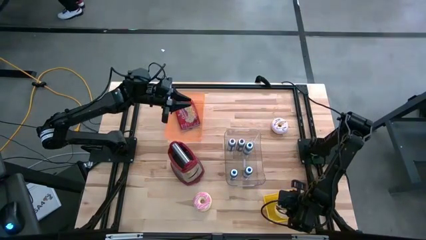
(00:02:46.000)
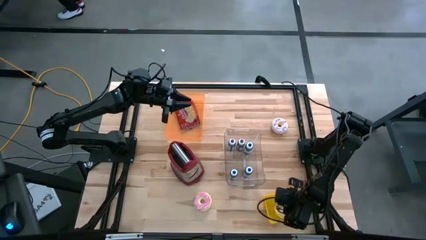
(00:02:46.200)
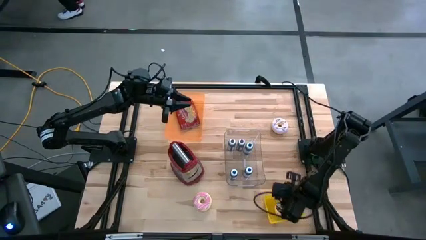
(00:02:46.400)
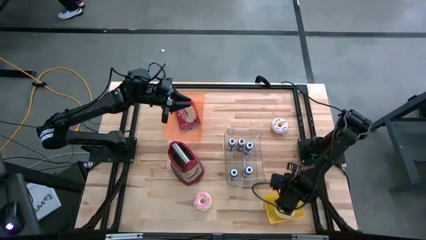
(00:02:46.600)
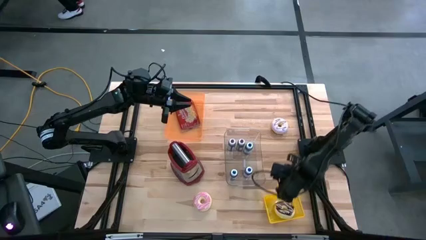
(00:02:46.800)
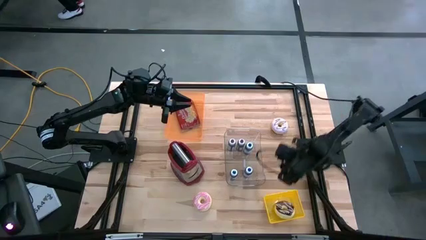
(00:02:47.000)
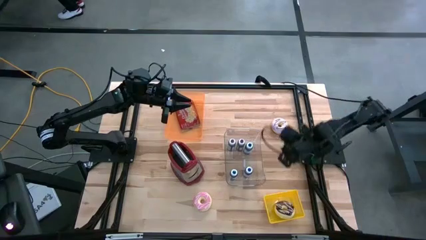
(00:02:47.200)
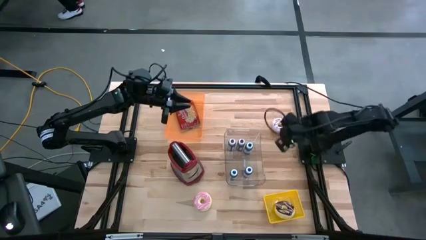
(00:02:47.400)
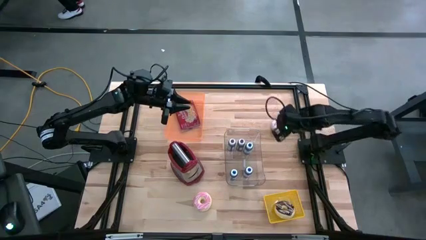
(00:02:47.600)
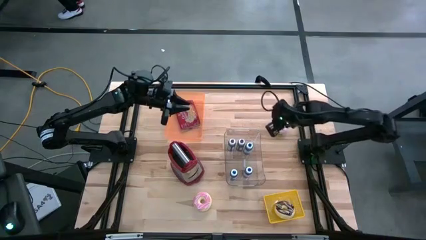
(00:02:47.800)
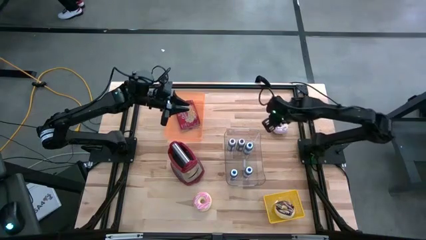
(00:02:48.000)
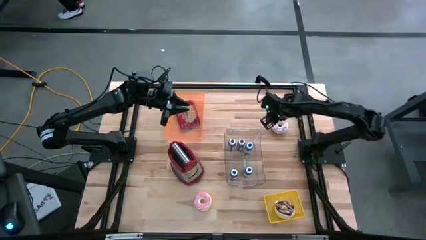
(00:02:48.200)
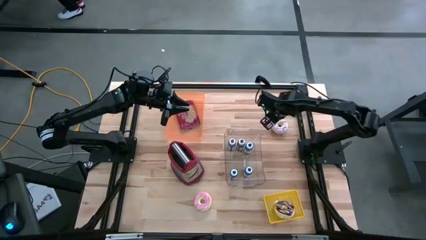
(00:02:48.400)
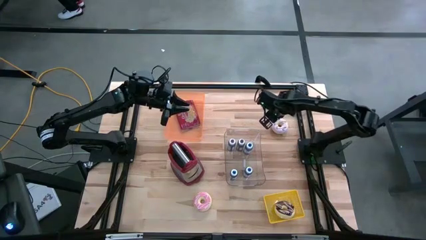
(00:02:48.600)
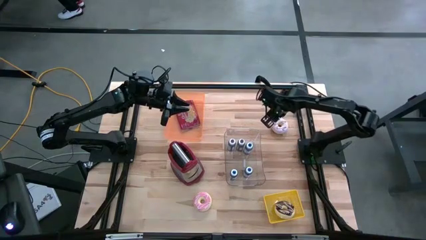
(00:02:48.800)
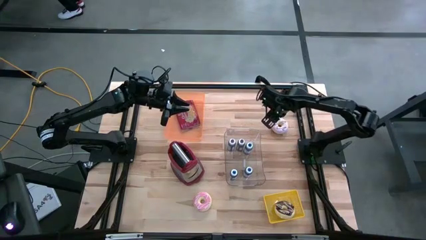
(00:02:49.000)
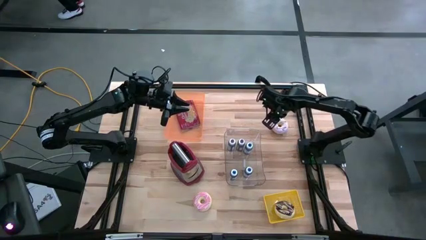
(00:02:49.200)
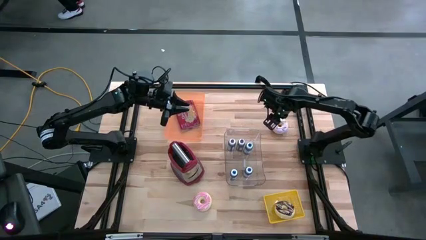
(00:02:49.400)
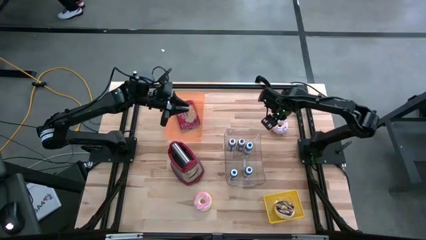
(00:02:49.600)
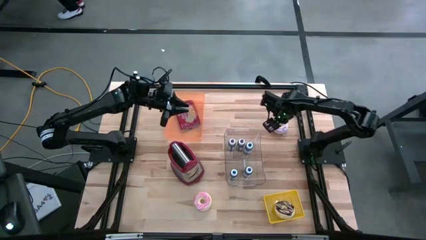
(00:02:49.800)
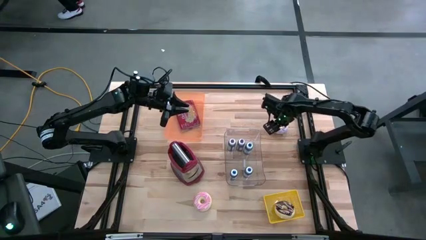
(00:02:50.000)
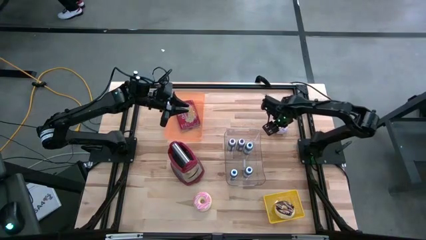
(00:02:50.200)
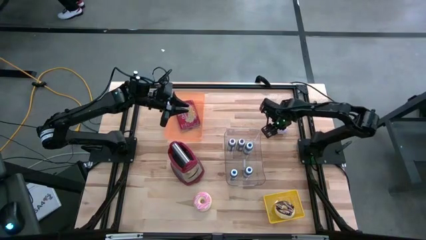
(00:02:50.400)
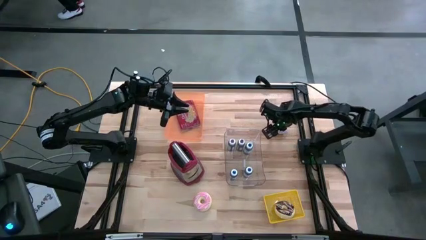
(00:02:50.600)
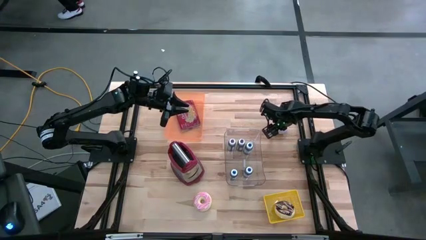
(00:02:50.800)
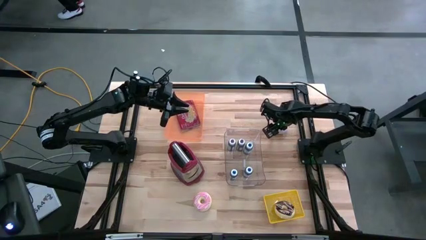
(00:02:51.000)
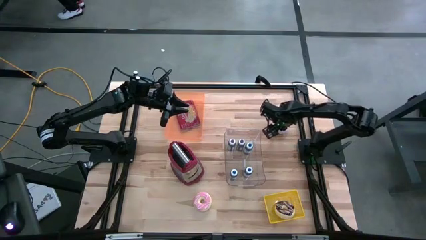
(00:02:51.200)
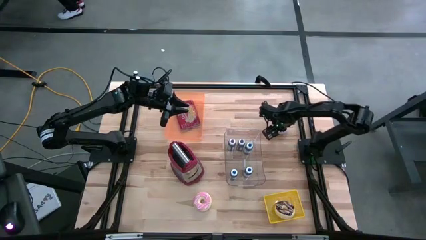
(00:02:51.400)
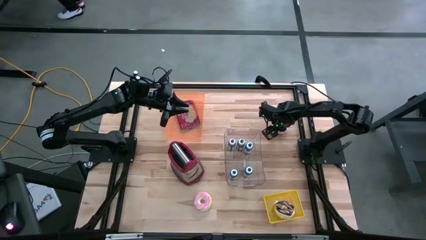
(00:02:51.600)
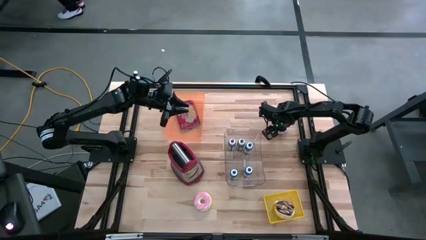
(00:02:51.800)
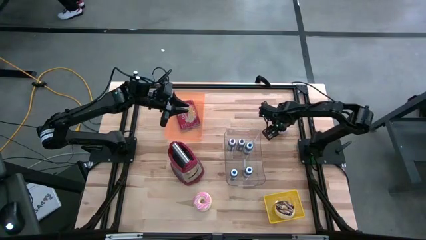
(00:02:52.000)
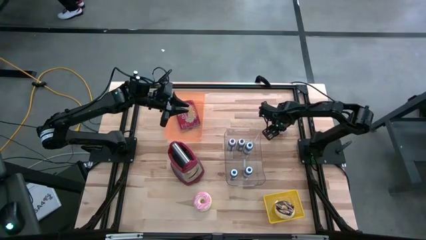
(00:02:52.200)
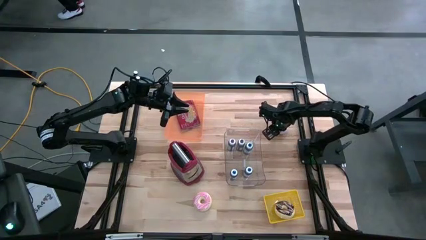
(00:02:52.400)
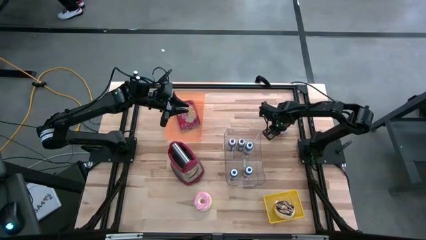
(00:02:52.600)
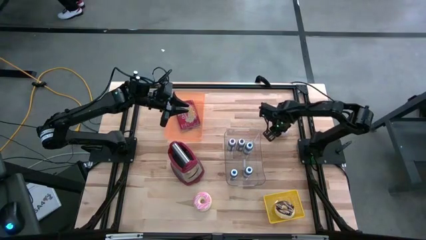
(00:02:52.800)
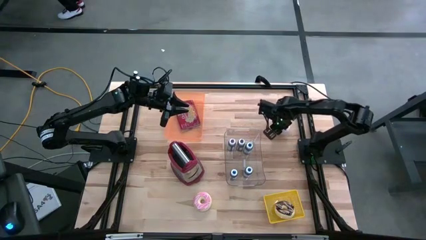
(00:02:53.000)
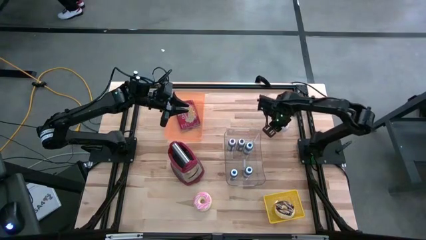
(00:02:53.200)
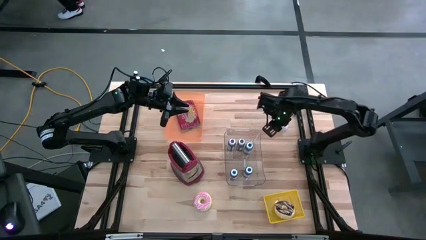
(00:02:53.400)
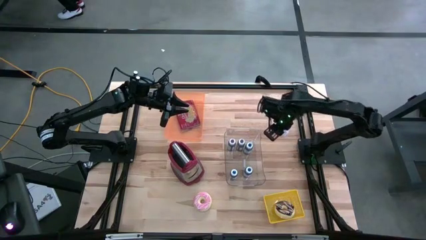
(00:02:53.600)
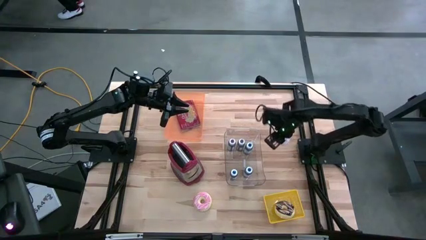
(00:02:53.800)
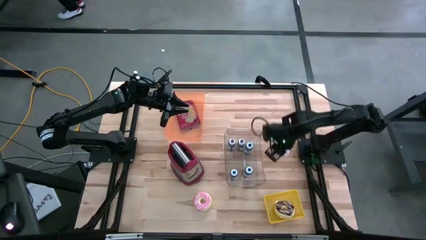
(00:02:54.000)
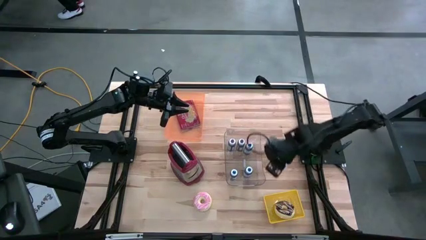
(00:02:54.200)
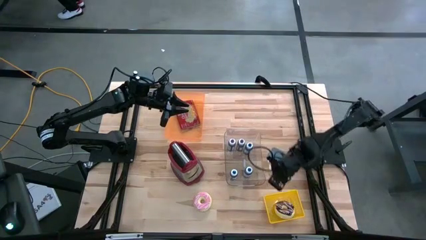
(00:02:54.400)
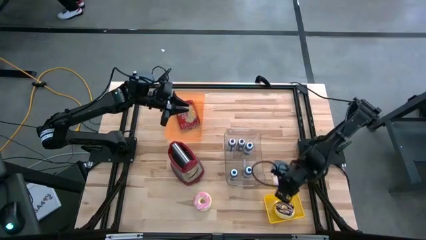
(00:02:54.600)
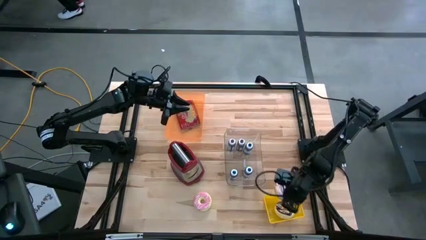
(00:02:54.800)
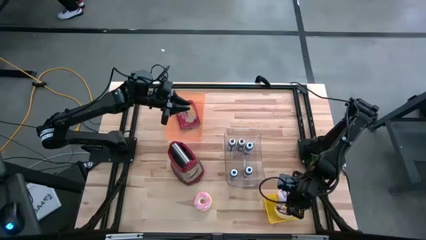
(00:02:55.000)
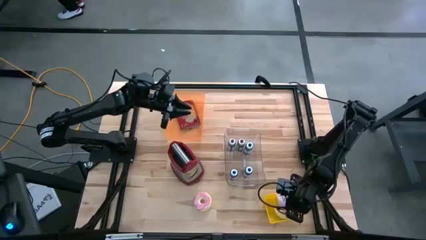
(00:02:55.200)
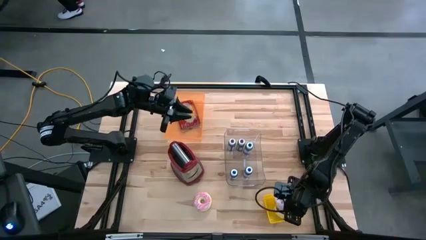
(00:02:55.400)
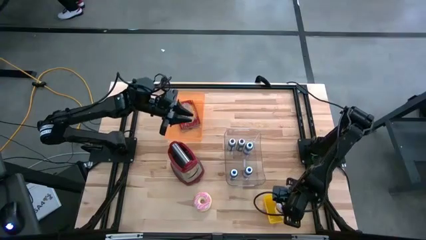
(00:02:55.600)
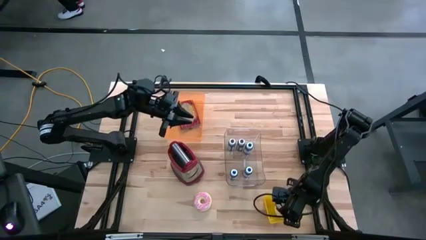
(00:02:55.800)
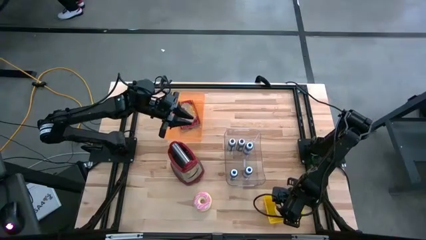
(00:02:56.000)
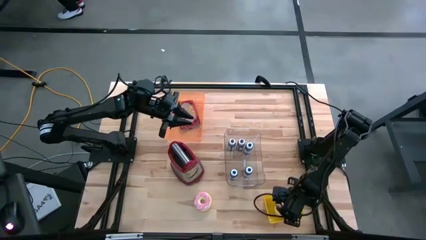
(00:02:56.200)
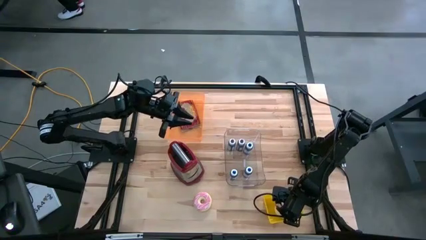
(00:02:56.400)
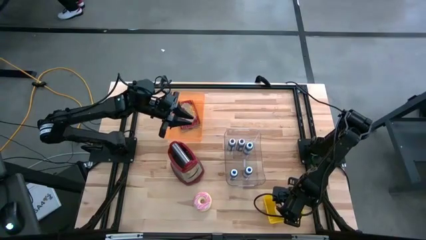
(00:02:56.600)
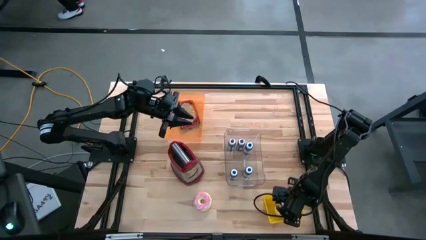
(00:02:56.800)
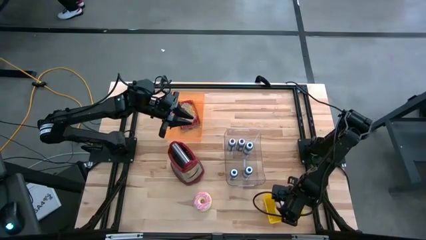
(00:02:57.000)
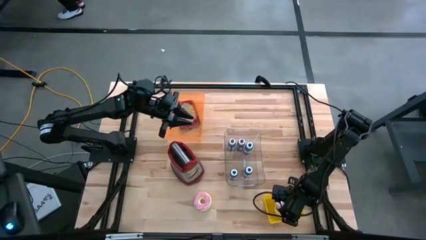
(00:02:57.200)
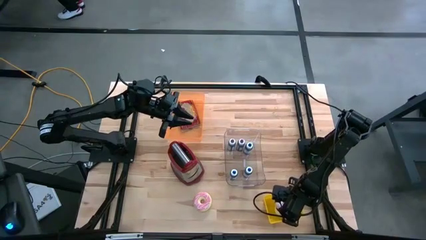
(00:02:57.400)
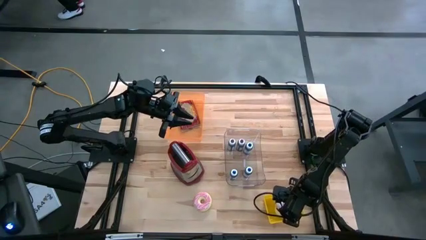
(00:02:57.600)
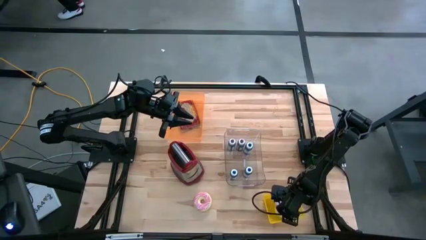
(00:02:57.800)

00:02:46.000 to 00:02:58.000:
Task: Pick & Place Food Item
Put the white donut into the yellow bin

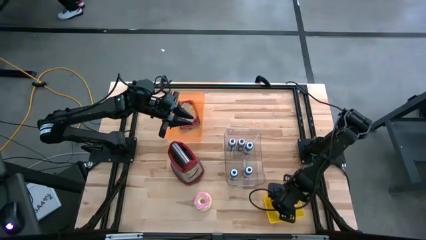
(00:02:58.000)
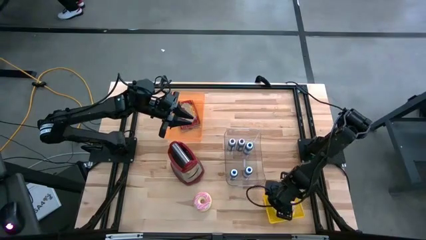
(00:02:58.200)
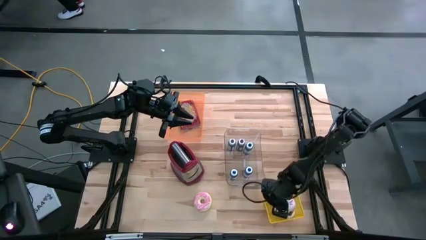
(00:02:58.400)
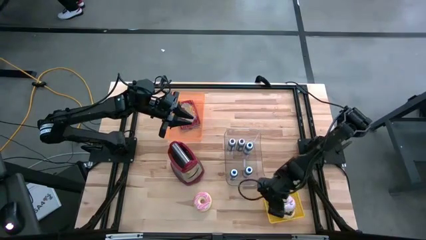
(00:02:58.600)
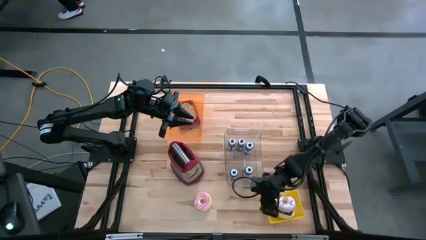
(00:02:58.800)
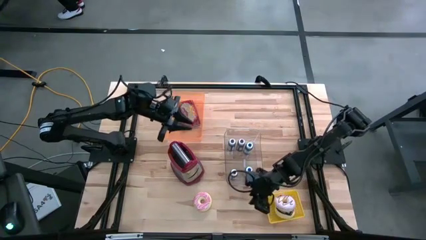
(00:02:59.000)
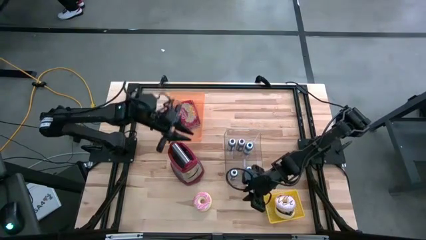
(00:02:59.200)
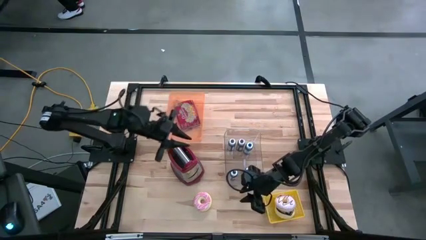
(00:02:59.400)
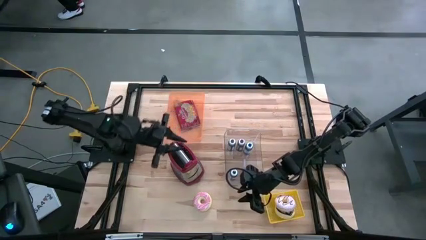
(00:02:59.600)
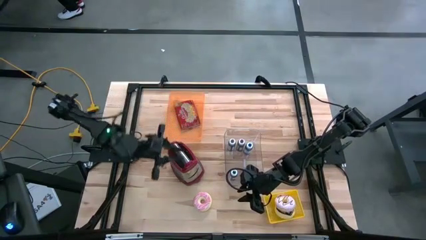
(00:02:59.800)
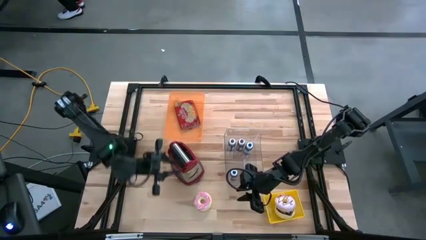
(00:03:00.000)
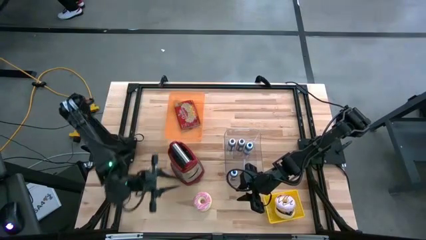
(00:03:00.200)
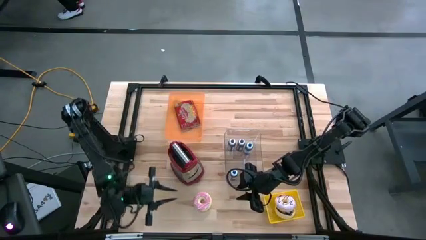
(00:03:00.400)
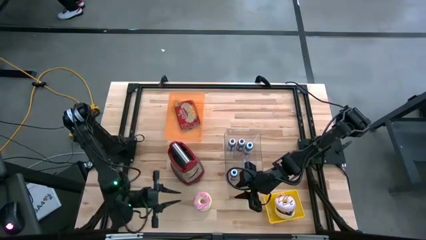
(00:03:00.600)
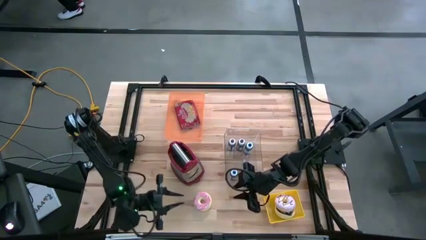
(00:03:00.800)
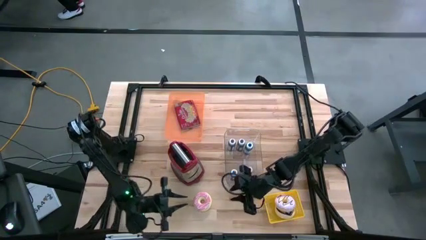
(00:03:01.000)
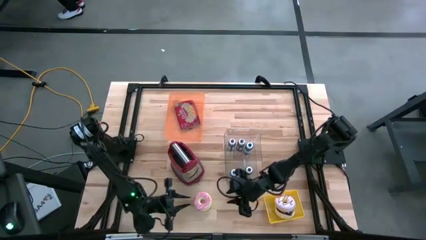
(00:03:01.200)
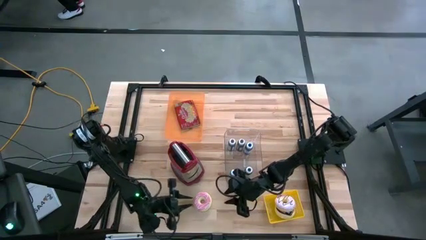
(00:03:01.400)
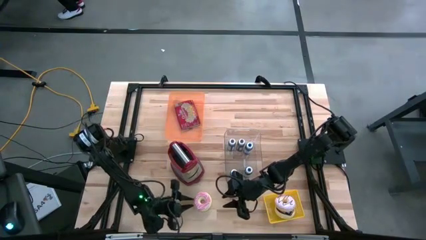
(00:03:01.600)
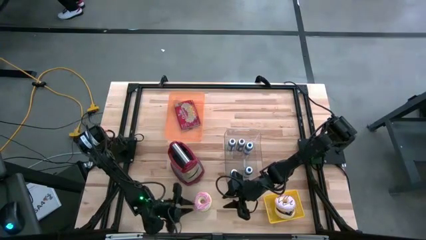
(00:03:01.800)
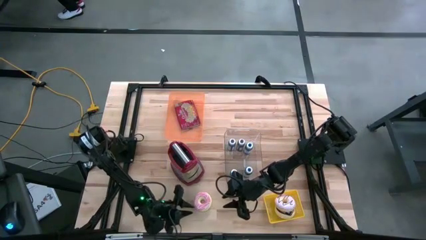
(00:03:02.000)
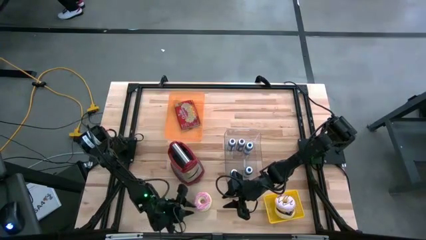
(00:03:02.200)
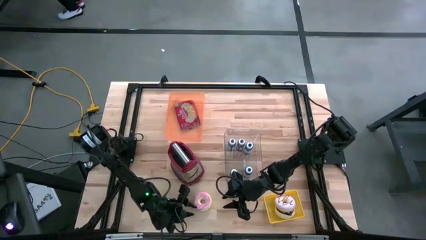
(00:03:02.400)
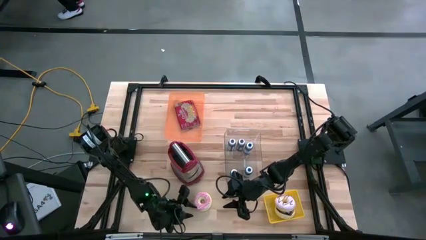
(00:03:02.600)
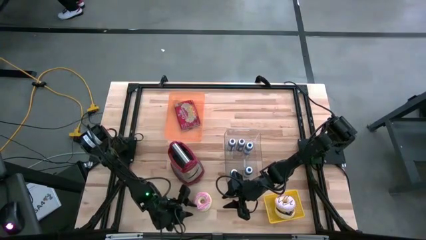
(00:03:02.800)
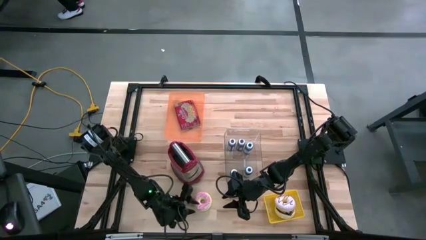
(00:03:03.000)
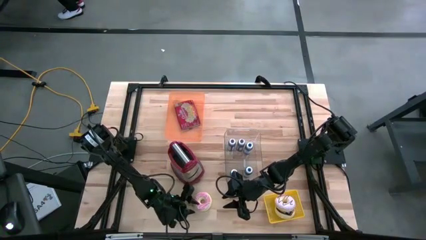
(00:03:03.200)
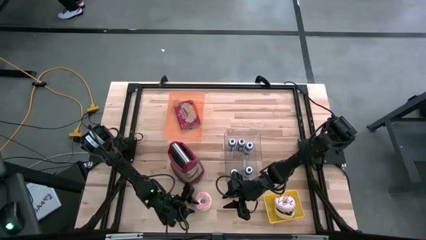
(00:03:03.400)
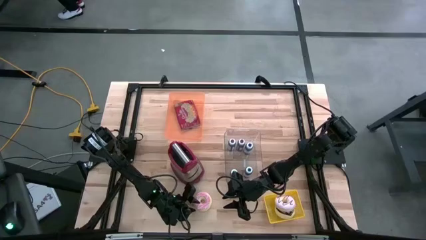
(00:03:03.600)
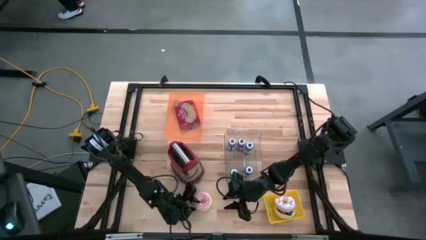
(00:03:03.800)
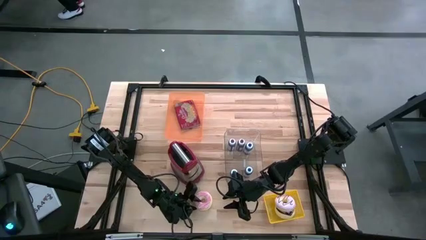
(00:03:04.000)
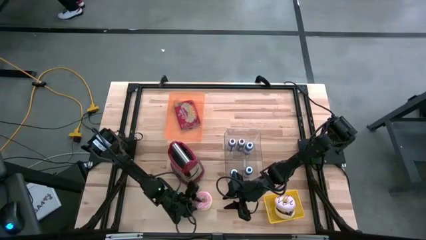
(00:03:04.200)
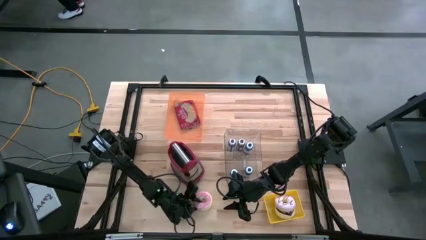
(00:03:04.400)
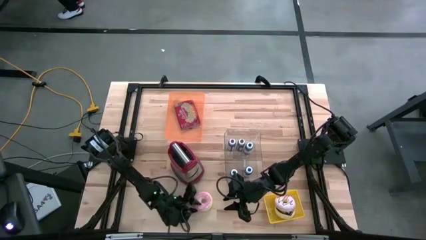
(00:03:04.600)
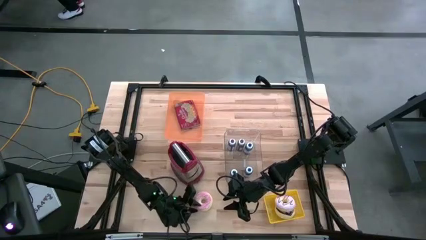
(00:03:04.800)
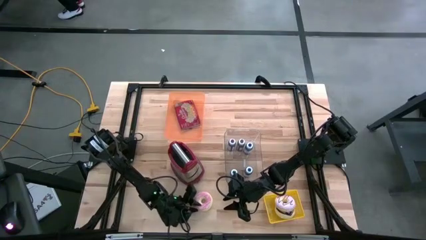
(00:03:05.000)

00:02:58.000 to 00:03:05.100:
Put the pink donut into the yellow bin
